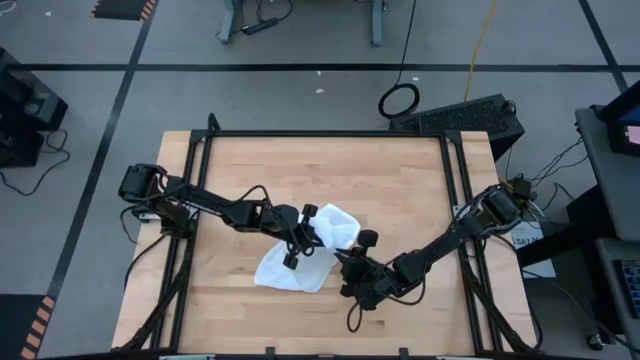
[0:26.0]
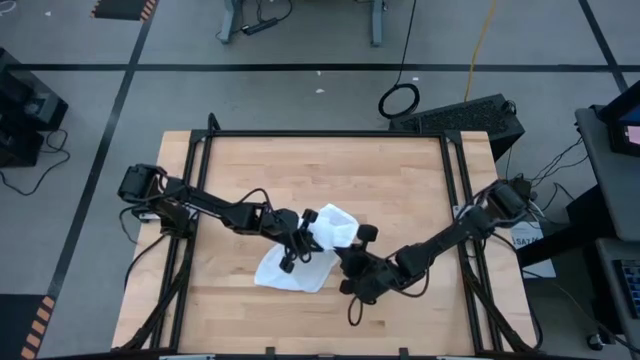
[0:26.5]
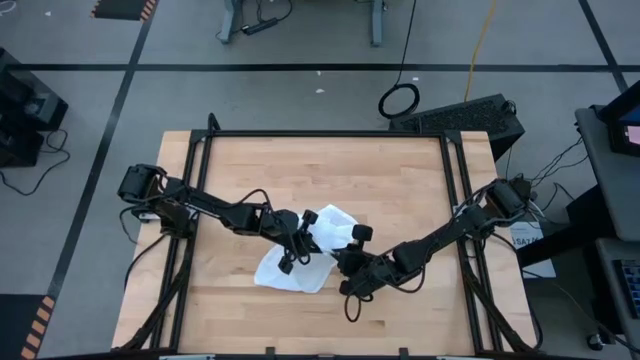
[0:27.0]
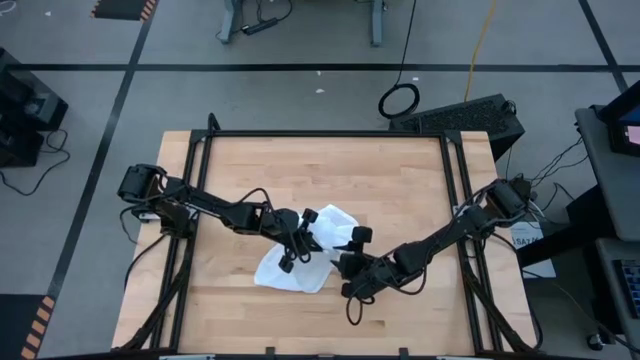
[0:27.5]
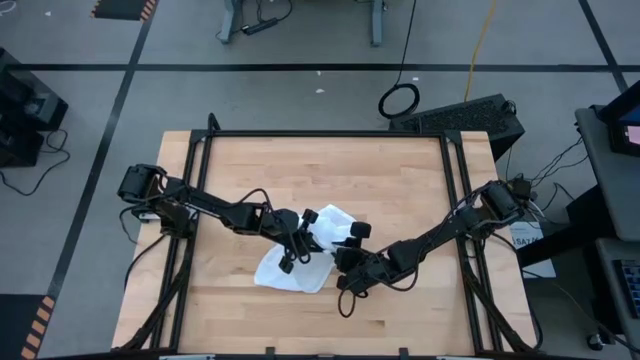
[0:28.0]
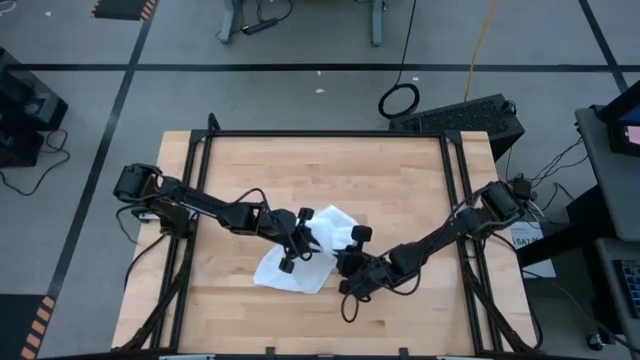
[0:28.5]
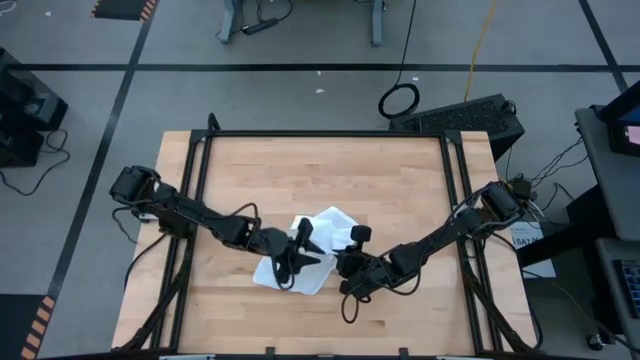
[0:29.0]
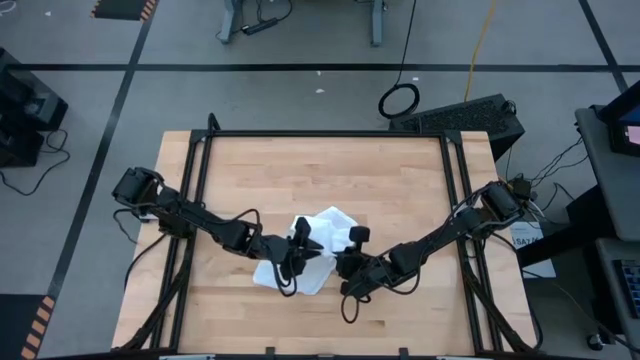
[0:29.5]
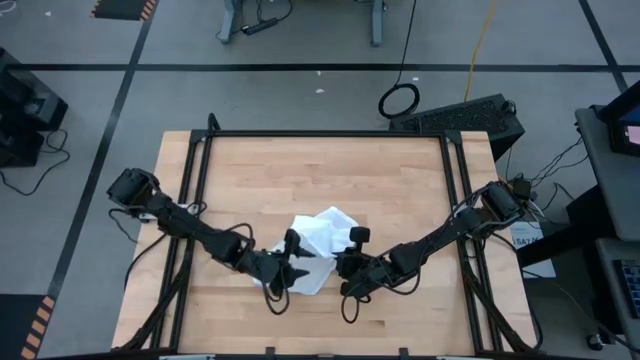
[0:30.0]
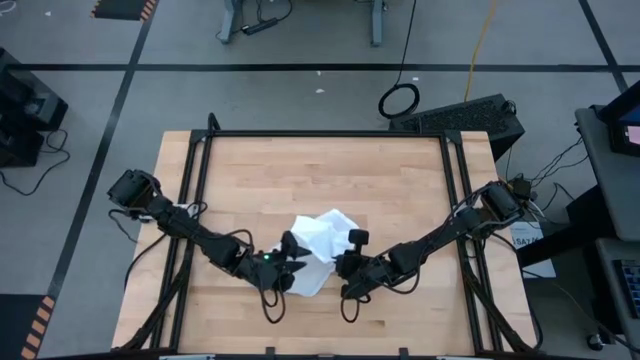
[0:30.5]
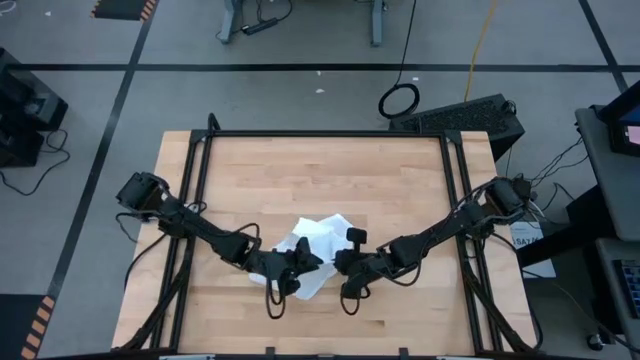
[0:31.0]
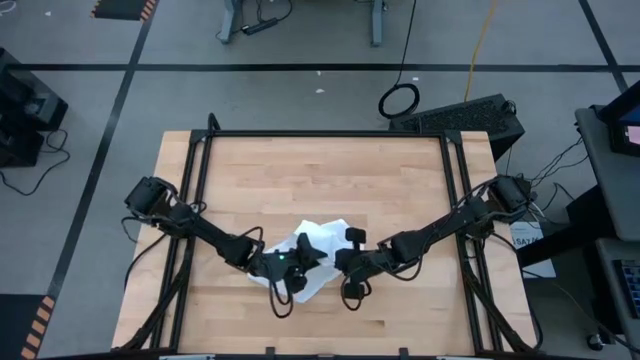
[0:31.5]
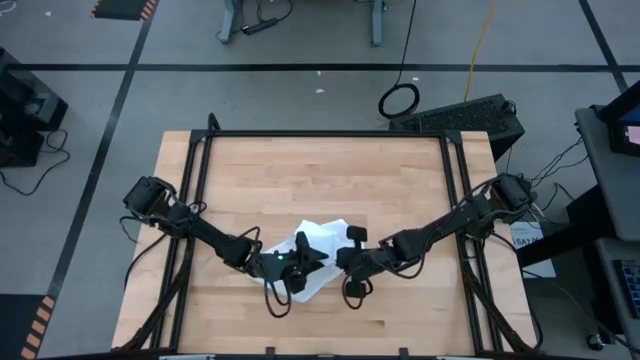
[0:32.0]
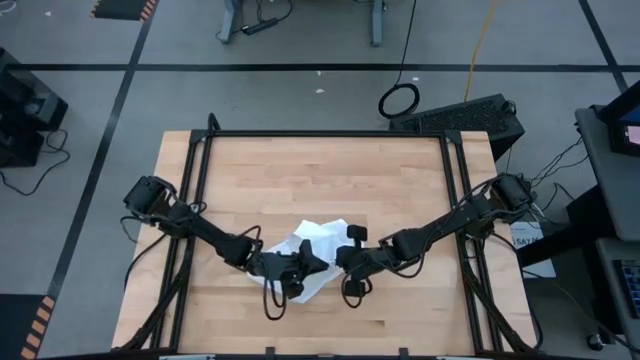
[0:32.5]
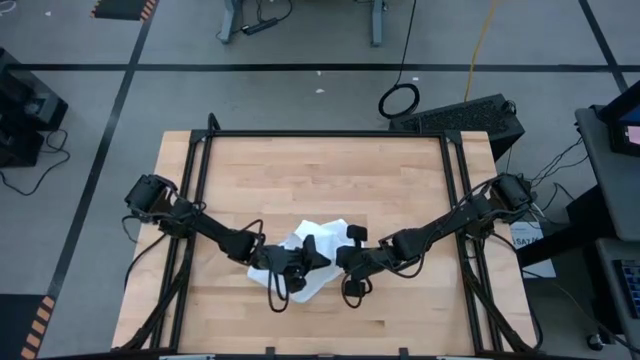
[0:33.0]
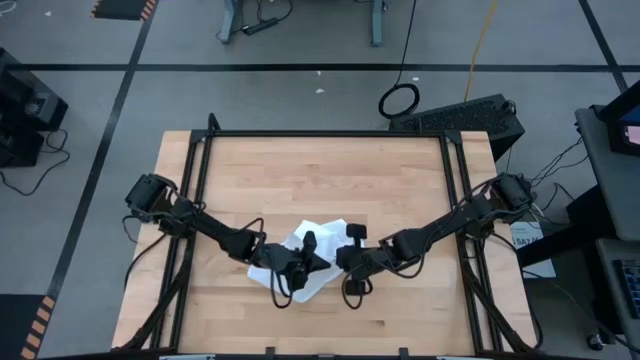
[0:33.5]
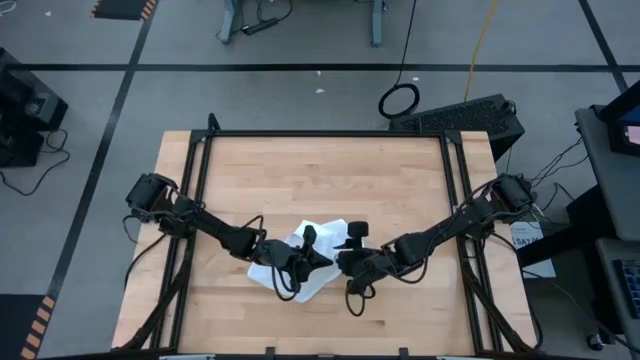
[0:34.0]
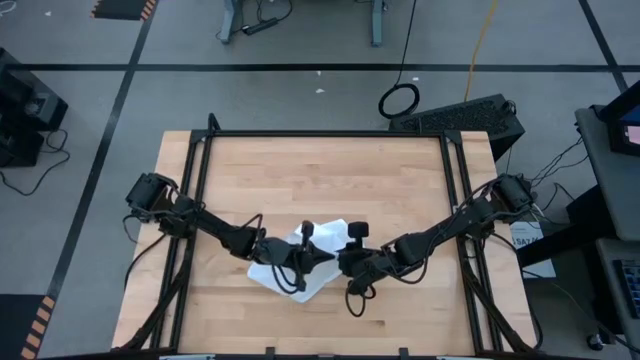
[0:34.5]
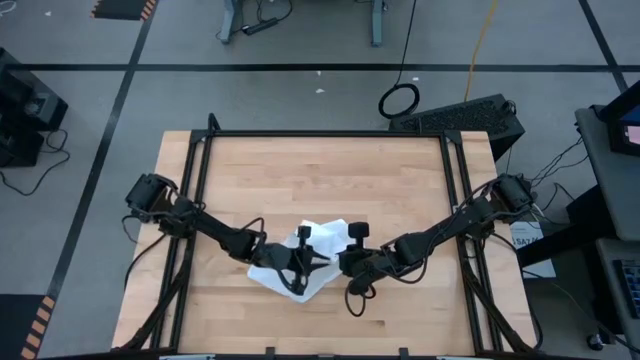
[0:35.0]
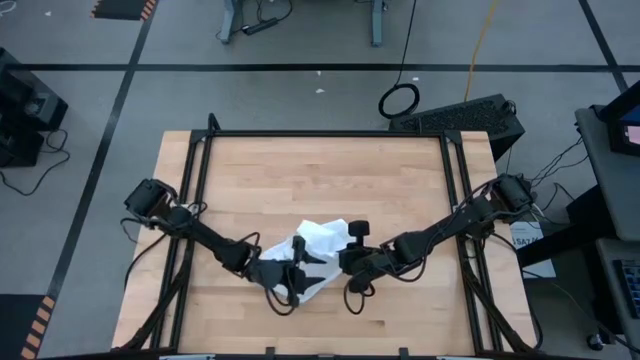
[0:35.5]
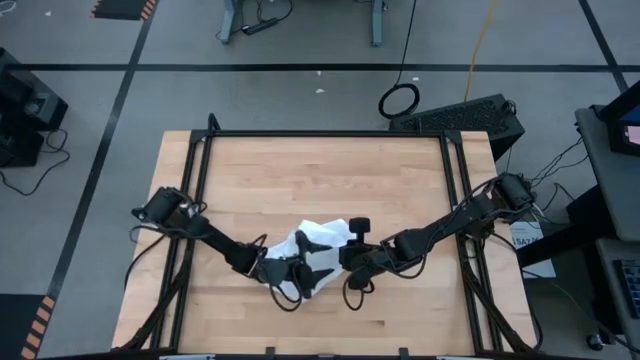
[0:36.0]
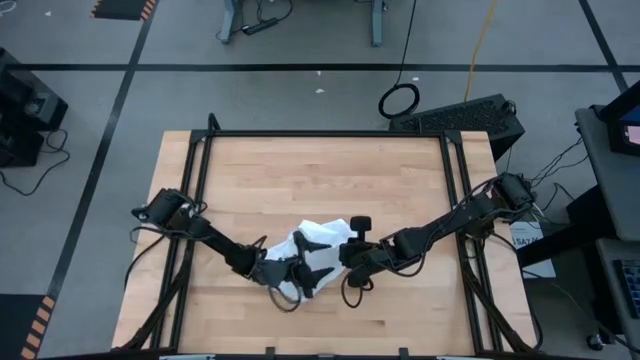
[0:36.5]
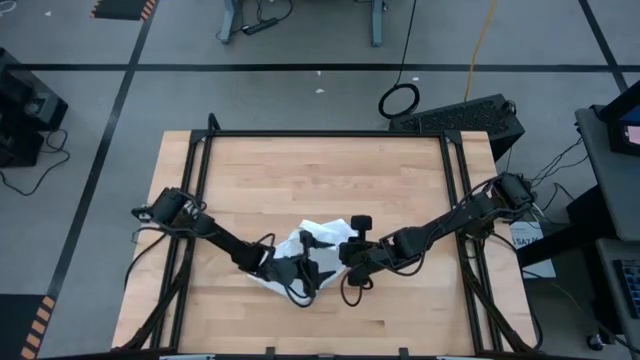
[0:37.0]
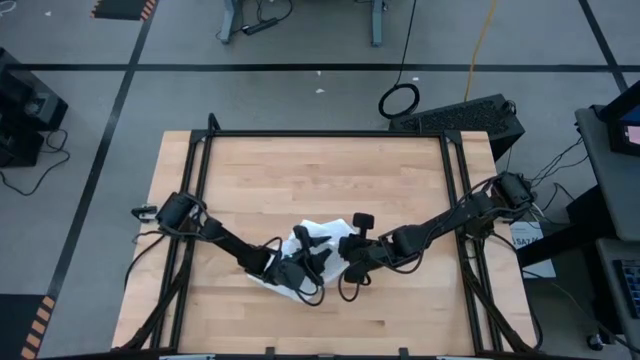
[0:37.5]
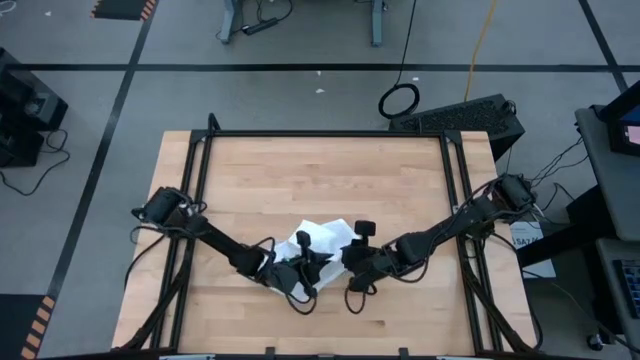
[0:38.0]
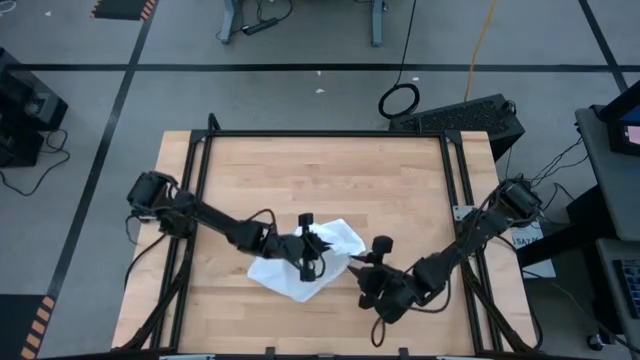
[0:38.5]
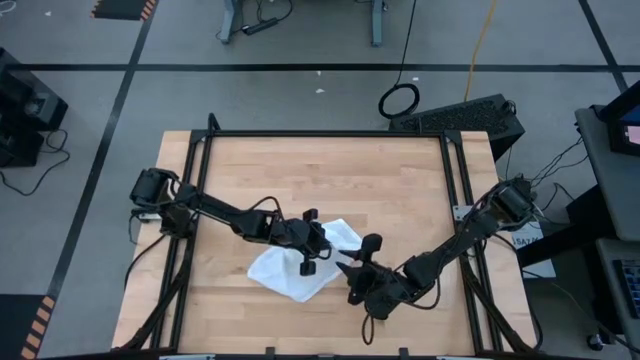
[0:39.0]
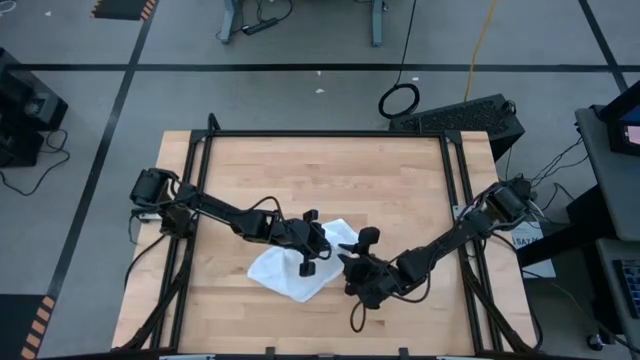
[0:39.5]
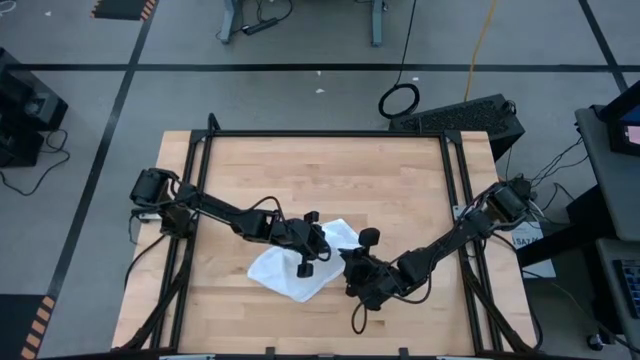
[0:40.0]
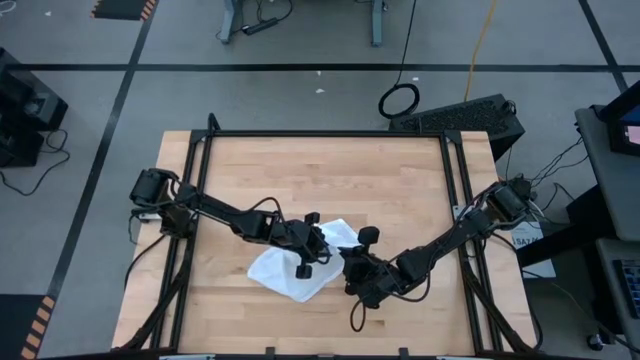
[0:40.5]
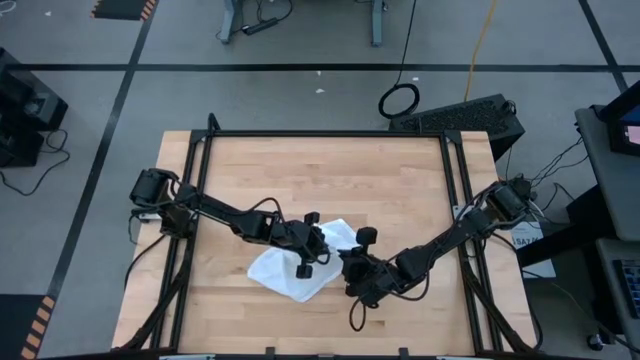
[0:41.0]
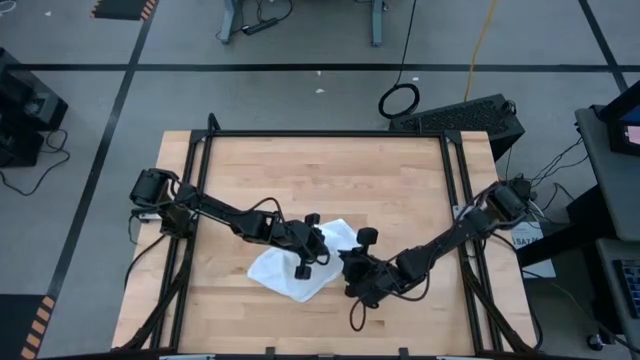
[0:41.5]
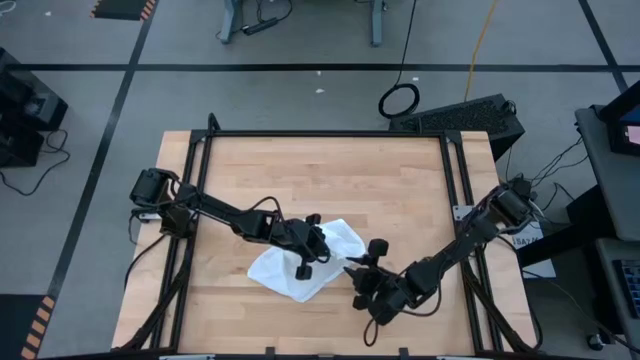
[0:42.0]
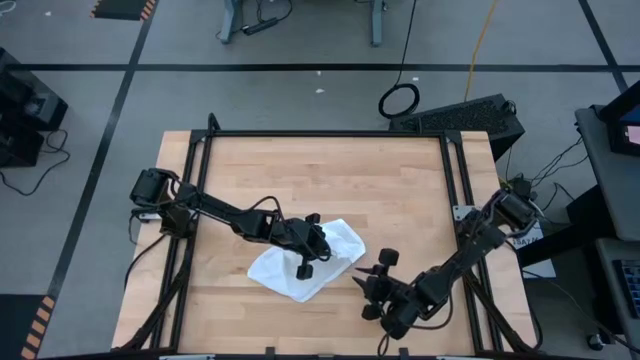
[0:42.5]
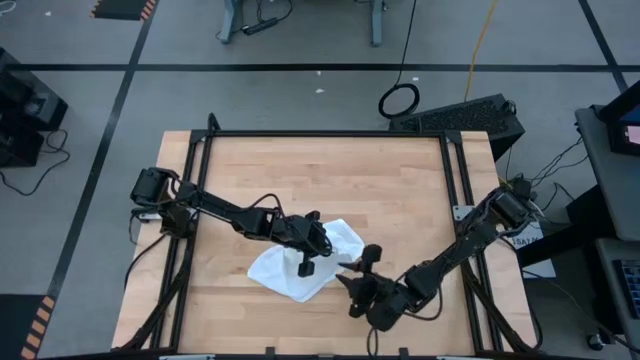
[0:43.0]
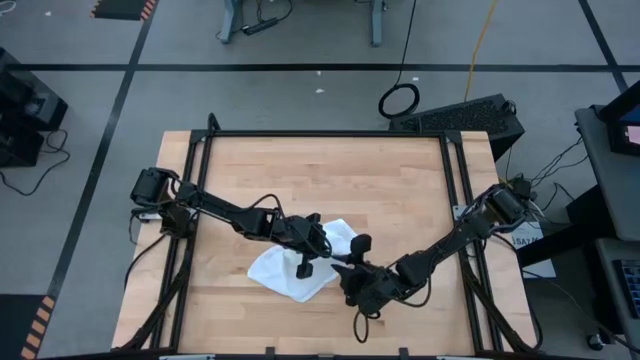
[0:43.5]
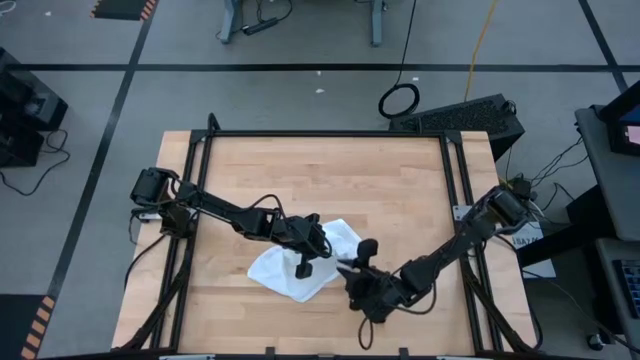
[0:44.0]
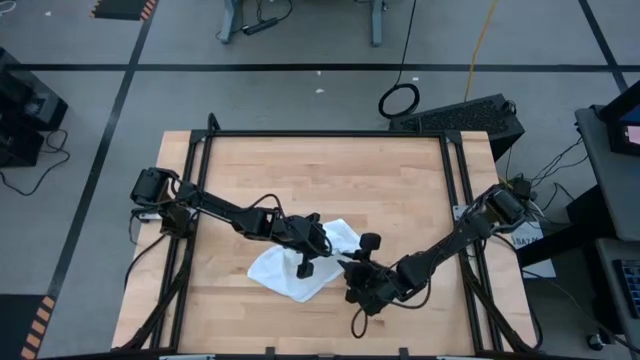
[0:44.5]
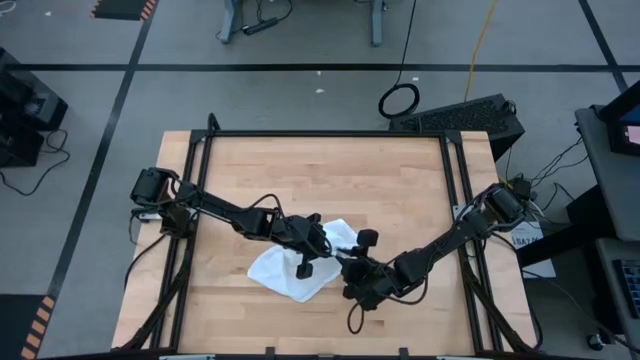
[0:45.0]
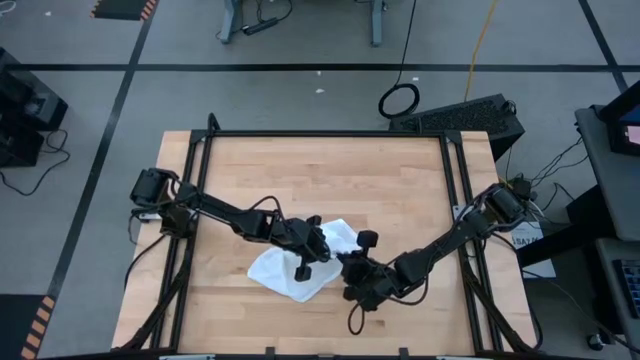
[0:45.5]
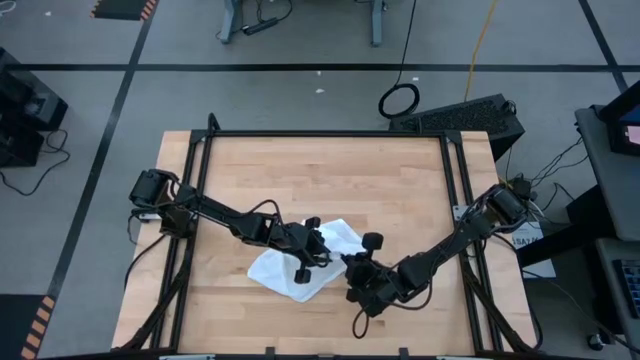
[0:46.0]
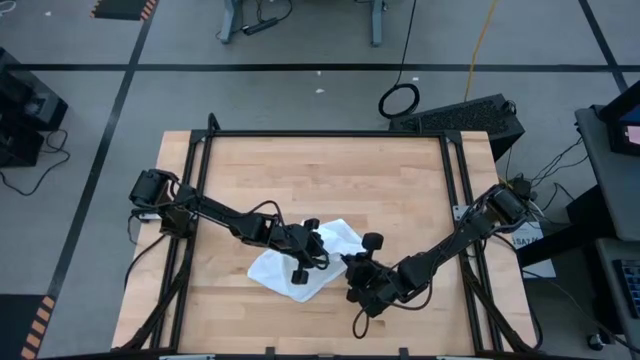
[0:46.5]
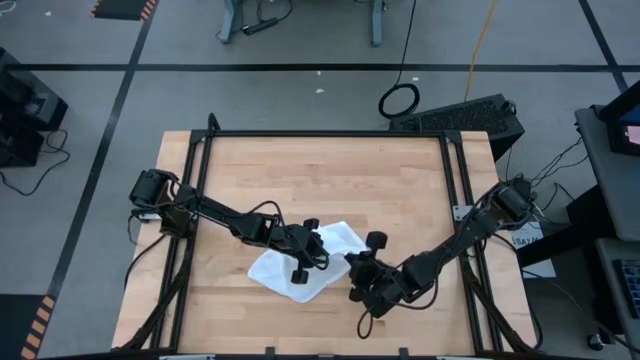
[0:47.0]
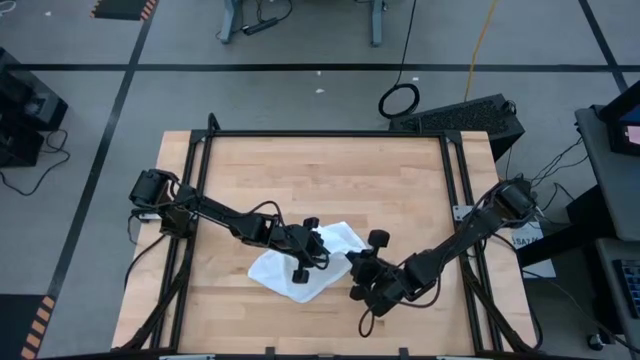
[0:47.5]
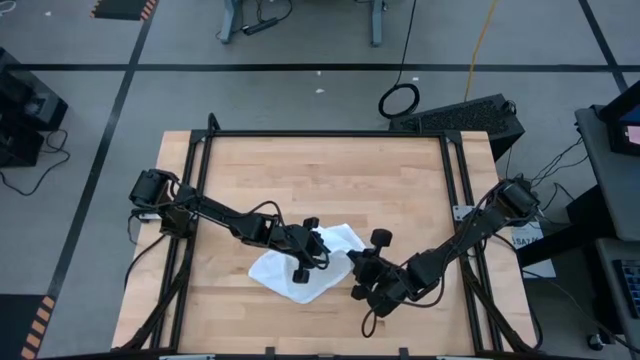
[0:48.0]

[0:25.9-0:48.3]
Task: Roll towel
Roll the white towel
